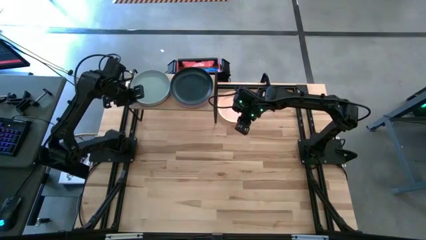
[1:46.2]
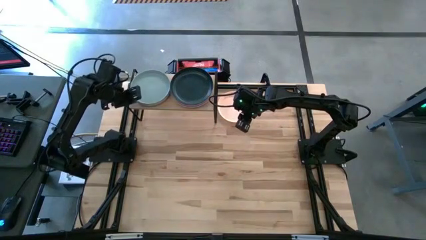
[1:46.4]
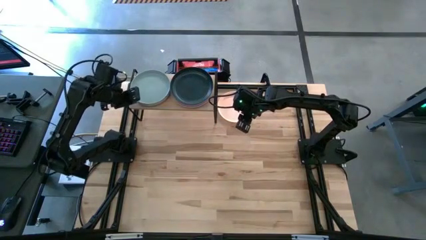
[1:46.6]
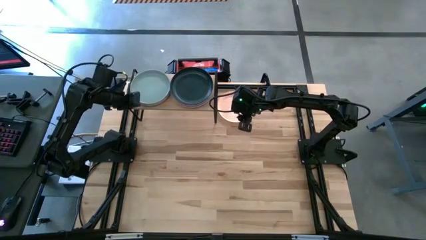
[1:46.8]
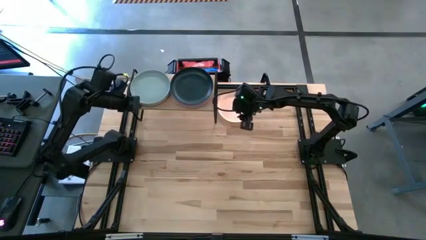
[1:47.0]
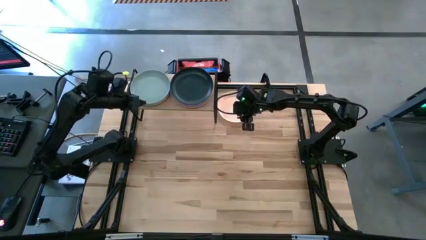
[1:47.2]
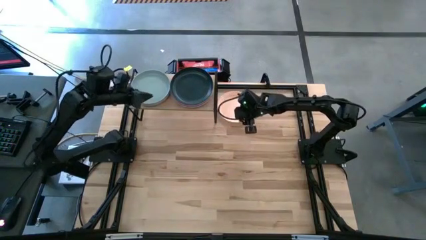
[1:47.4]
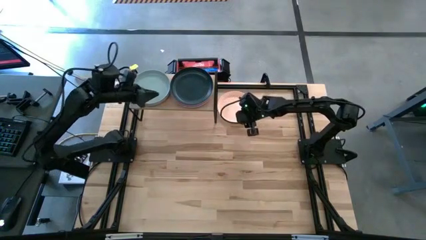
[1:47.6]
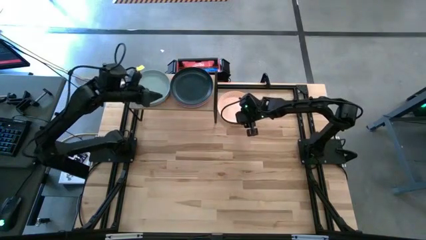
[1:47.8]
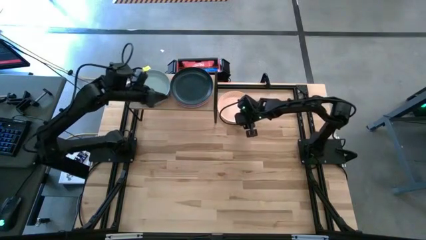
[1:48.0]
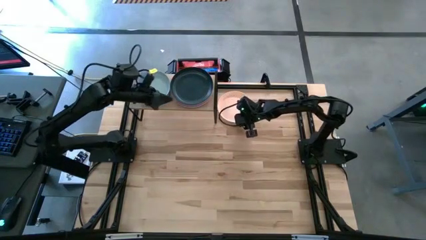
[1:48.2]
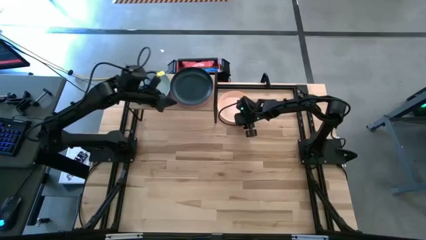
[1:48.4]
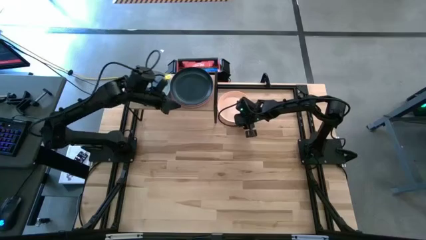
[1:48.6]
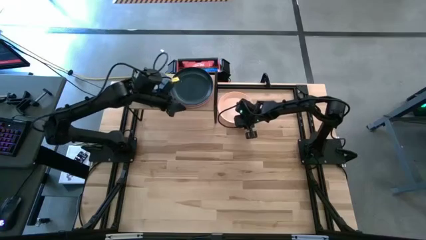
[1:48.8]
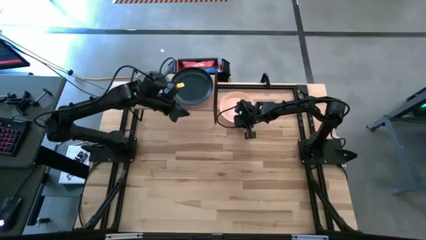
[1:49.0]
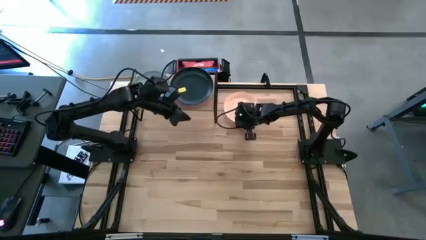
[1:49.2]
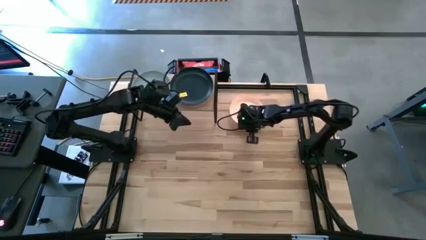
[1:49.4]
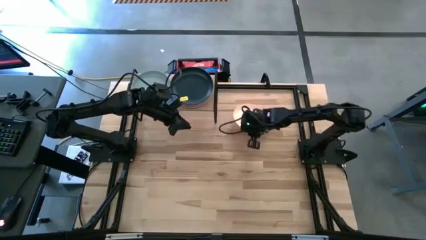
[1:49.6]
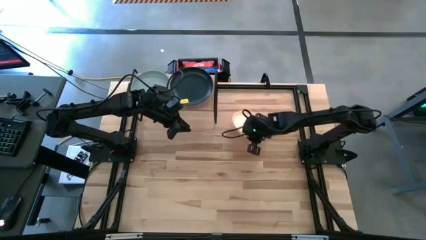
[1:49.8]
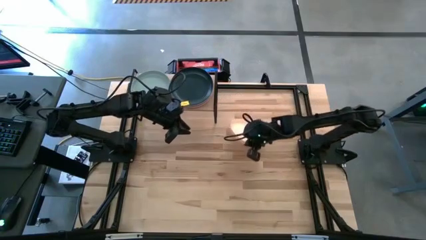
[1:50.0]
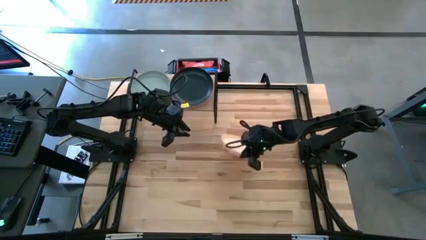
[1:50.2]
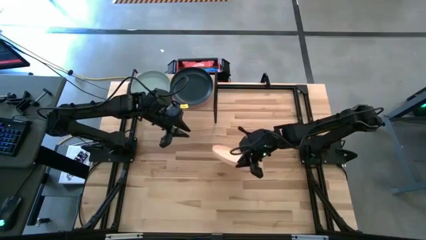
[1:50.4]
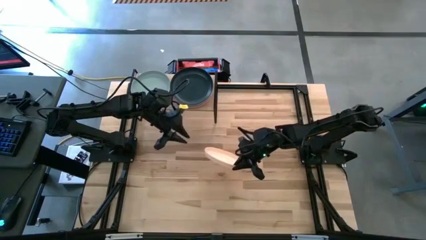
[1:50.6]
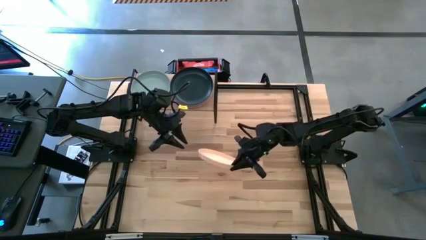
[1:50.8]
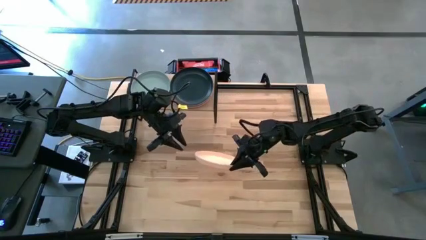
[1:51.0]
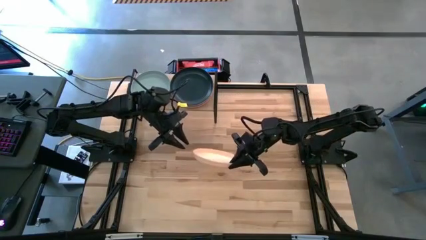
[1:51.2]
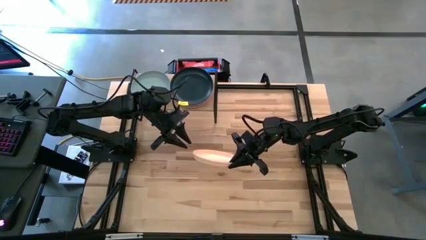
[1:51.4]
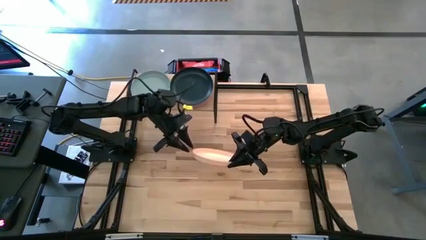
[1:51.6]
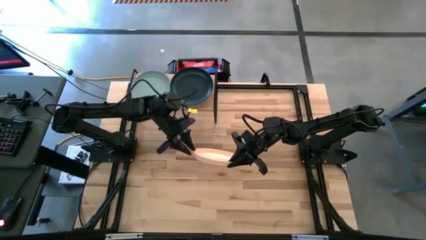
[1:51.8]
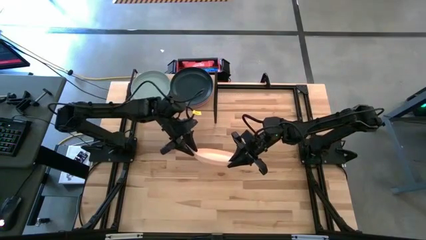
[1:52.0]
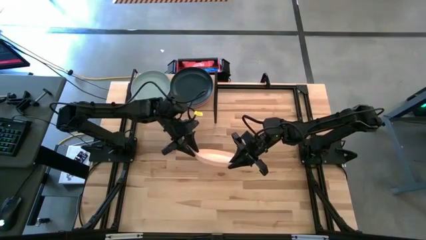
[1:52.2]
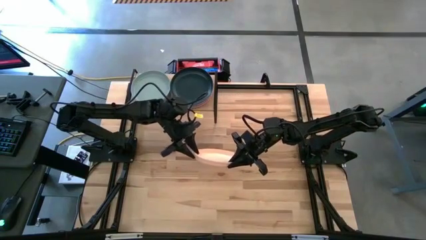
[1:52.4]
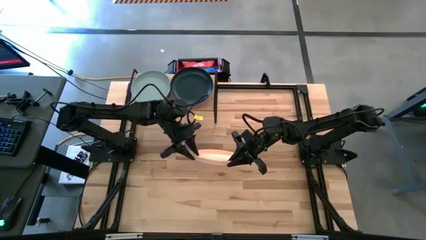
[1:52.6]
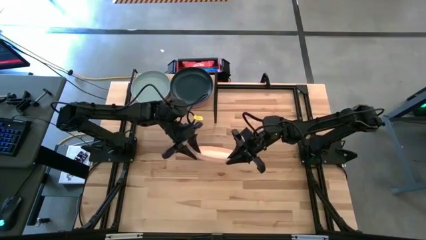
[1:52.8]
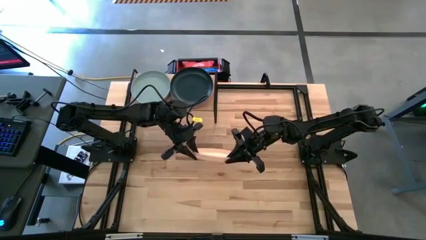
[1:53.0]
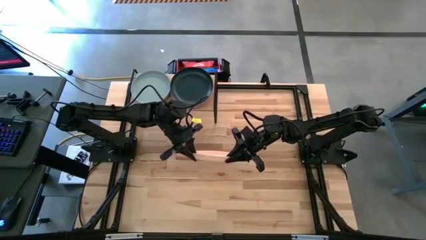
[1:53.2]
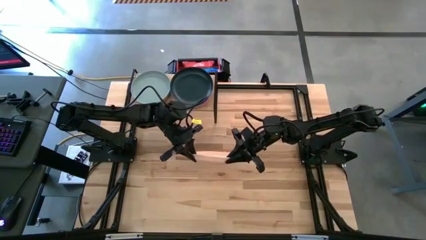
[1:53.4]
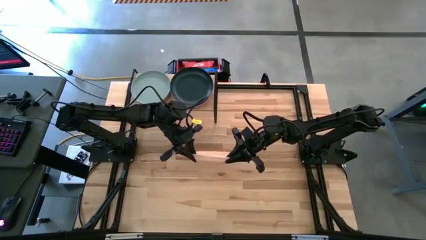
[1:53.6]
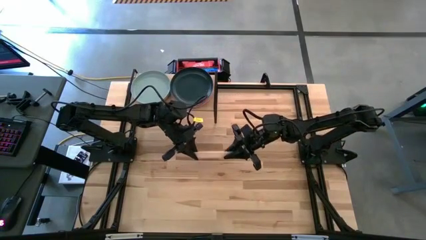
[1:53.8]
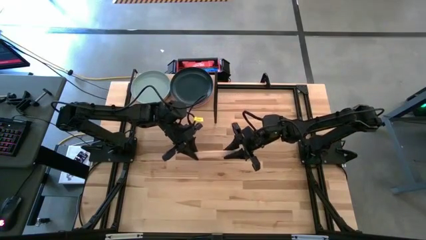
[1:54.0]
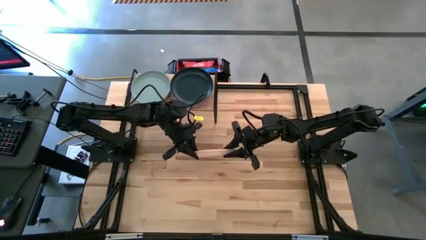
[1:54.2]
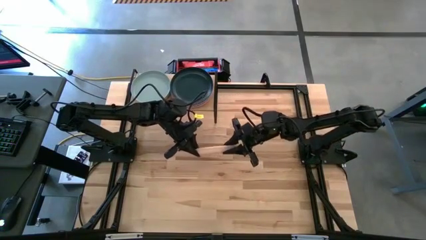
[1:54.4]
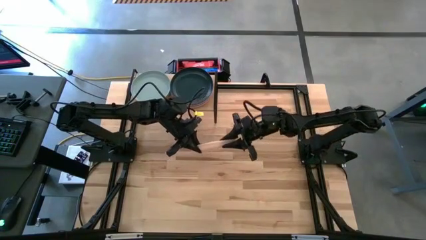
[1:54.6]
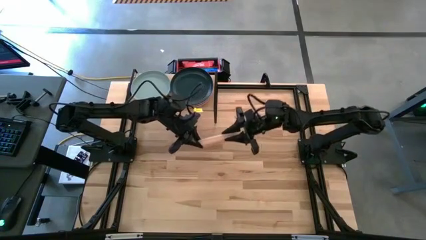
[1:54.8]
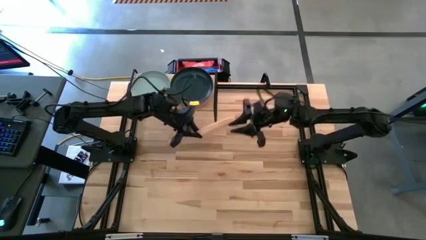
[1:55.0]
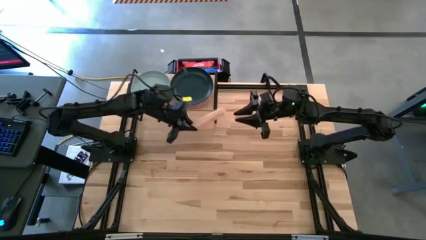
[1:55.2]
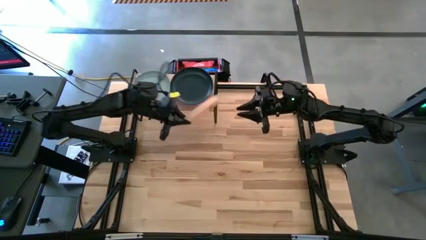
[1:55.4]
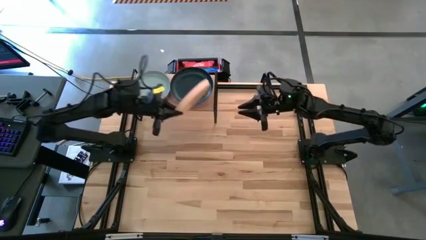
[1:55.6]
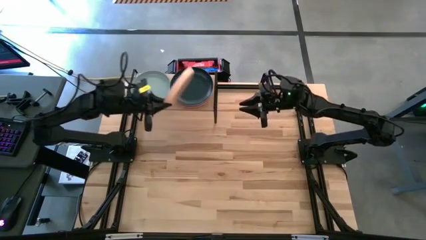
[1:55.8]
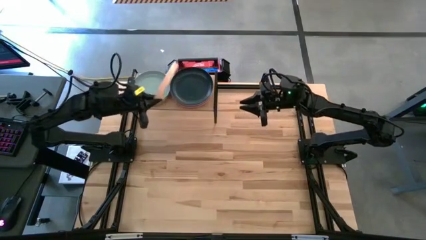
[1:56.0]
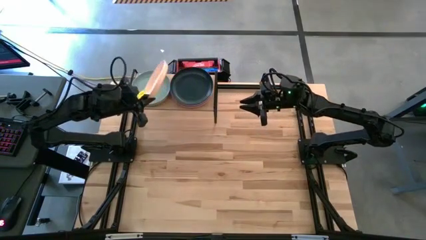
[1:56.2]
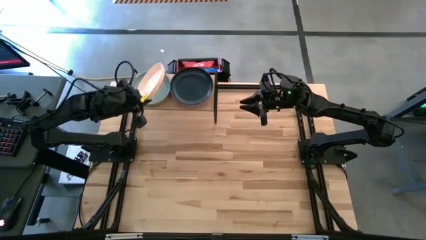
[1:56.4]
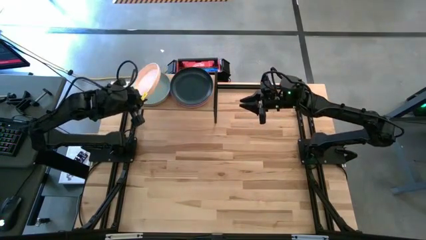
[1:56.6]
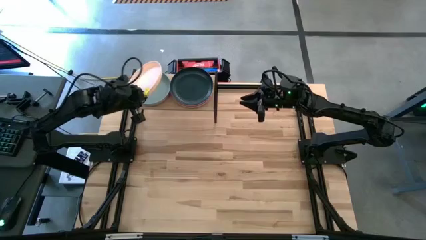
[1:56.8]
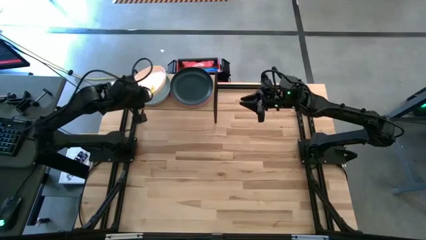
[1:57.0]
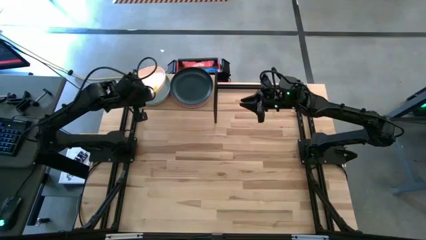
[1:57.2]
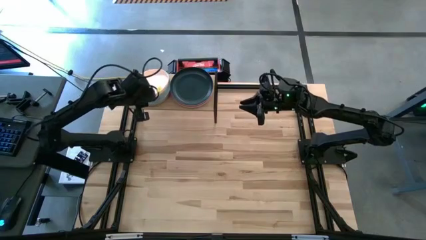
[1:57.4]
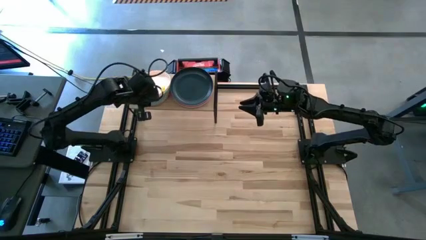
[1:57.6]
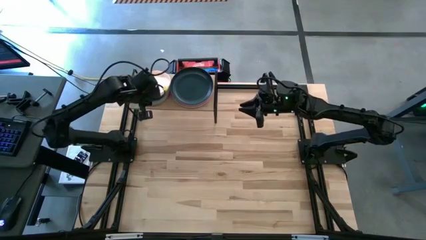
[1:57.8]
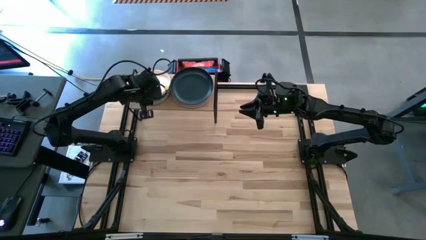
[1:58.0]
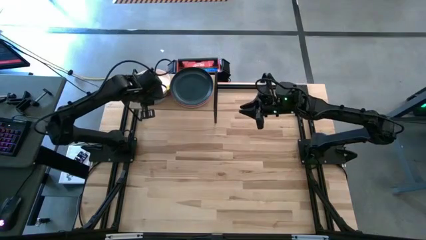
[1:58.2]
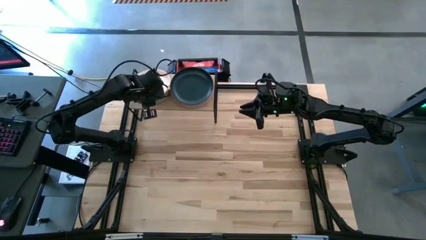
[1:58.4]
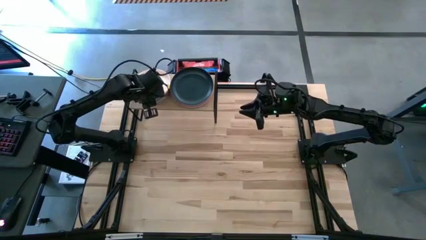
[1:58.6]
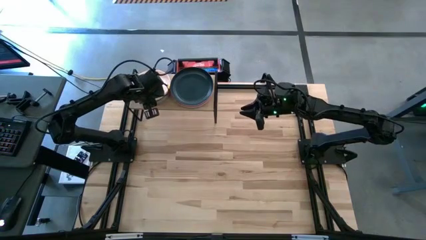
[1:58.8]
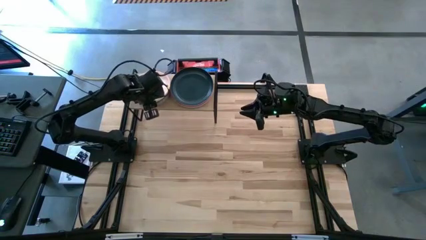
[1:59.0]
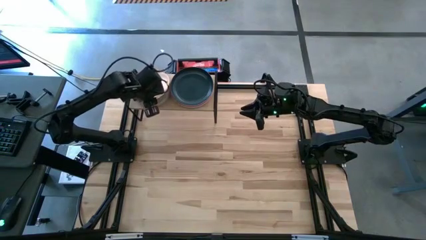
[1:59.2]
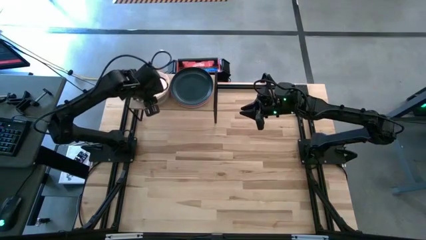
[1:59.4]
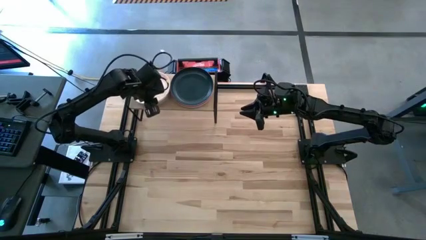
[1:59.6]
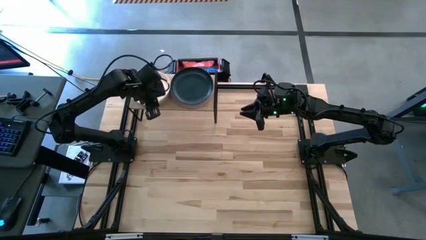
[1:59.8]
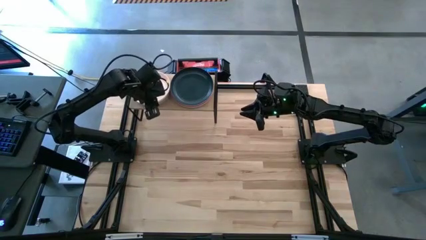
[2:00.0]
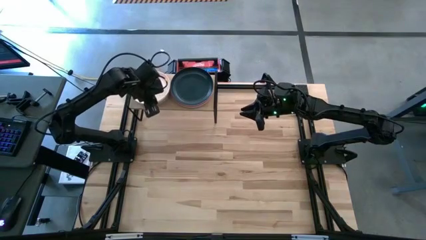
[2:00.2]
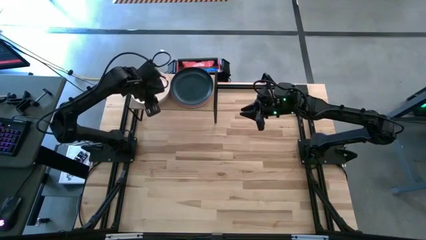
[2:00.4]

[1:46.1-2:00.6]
Task: Place and stack plates onto a shelf
Stack the light orange plate on top of the blue plate on the shelf

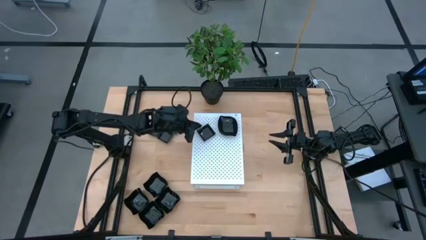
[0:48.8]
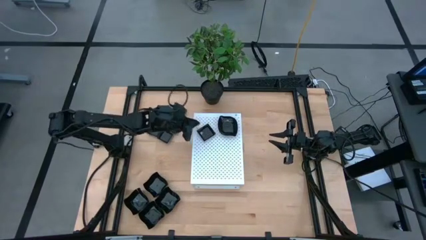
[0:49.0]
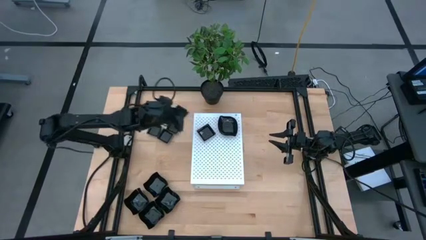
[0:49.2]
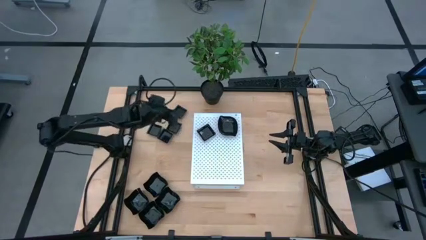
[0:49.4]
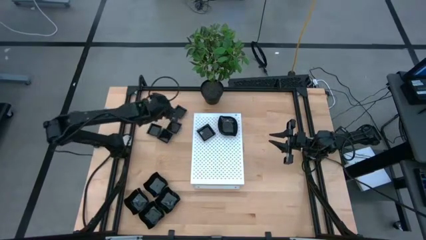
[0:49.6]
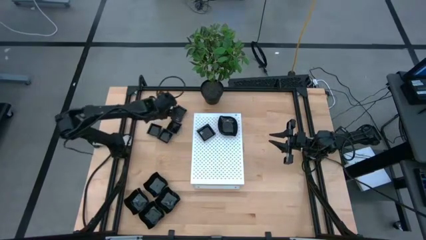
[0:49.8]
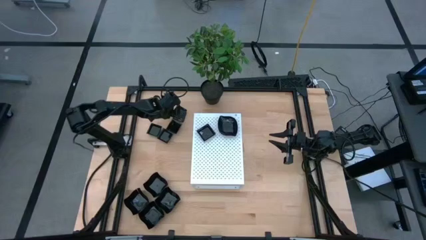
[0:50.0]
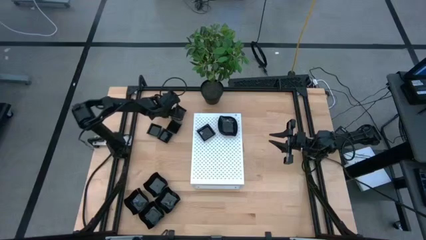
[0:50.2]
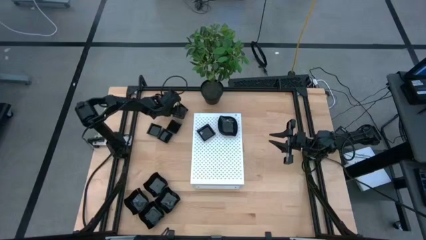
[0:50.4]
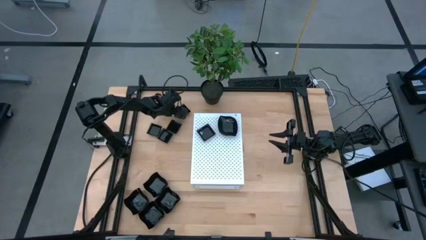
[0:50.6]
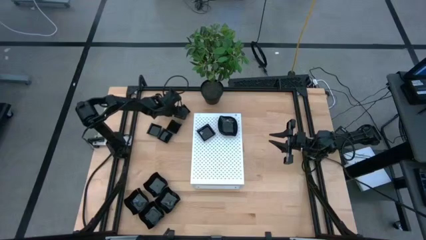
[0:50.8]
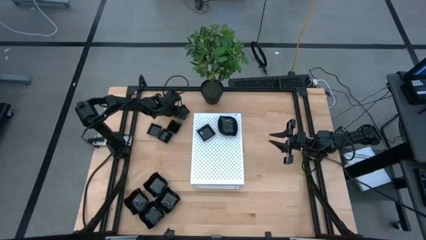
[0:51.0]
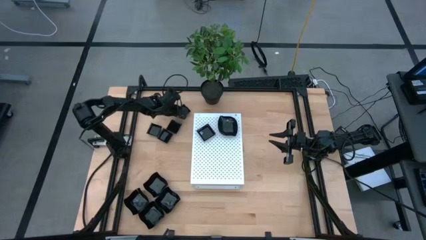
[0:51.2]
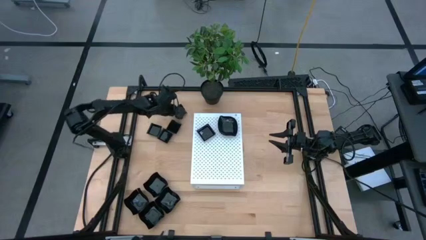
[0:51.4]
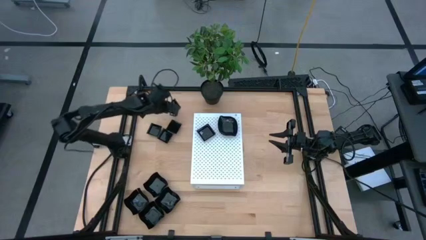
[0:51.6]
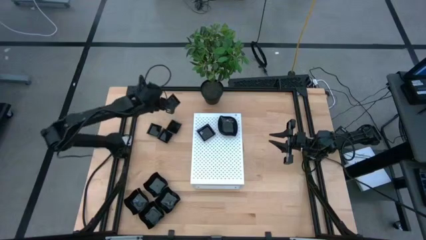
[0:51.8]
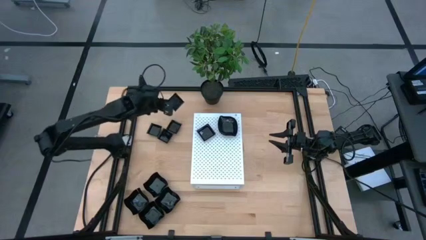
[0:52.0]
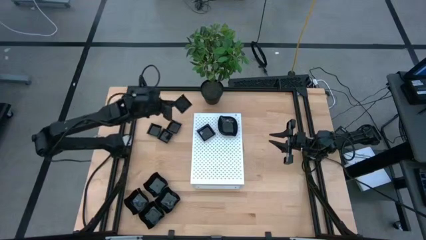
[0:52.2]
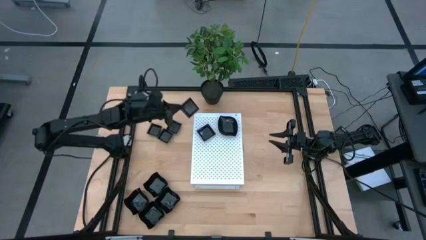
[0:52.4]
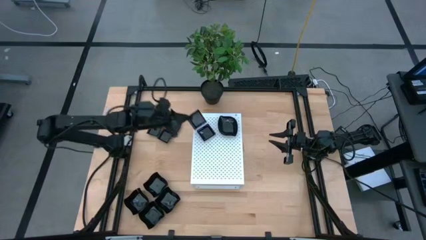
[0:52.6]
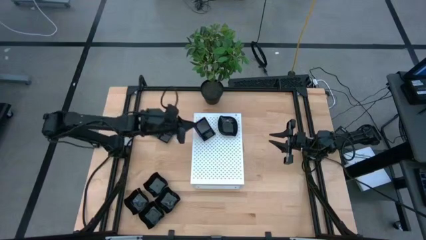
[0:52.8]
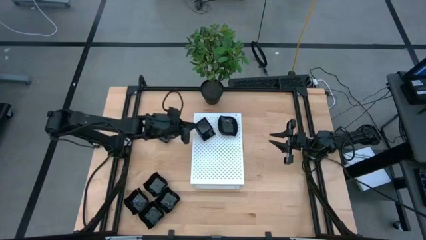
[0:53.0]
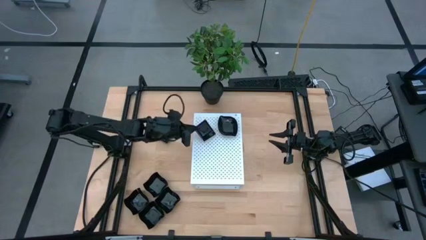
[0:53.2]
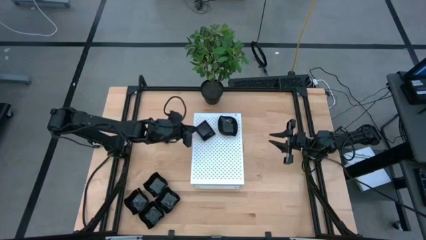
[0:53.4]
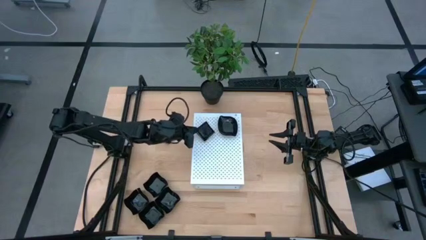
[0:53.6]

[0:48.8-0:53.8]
Task: Pick & Place Mini shaped plates
Stack the black square plate on top of the the black square plate on the shelf
